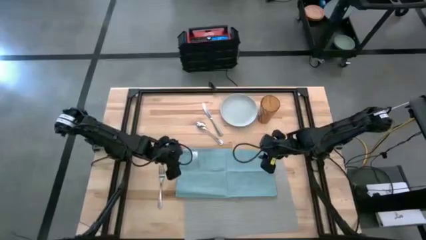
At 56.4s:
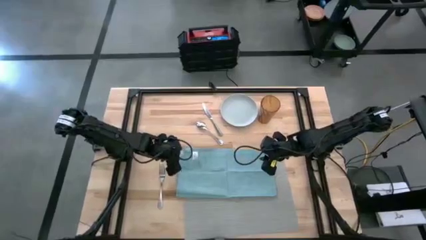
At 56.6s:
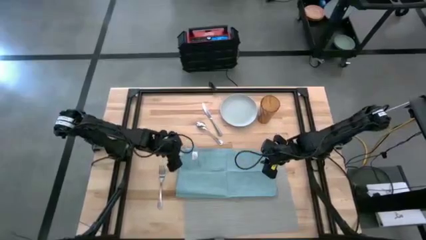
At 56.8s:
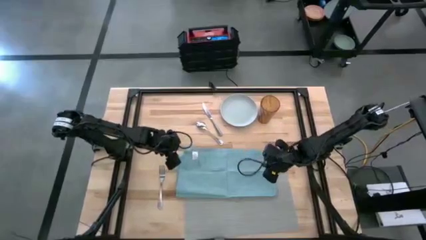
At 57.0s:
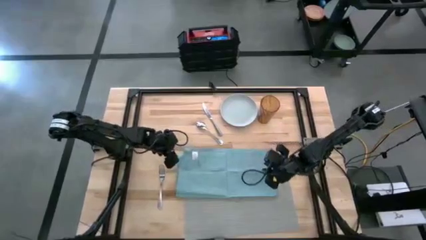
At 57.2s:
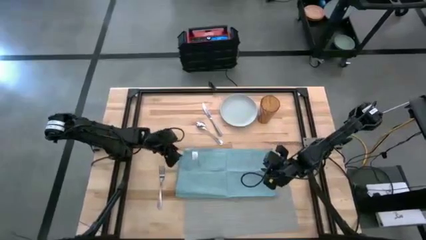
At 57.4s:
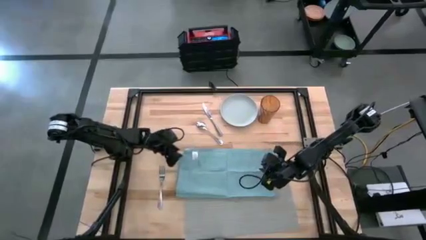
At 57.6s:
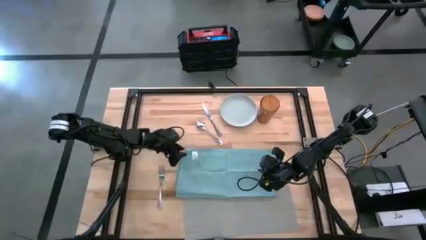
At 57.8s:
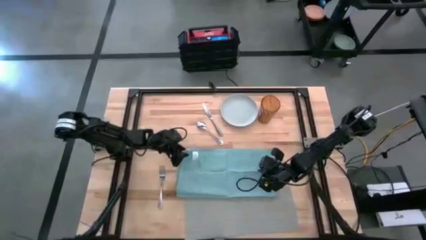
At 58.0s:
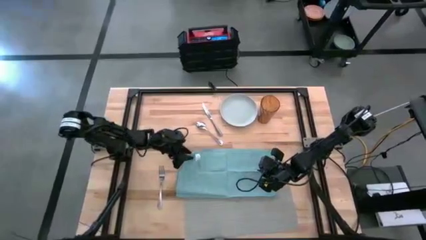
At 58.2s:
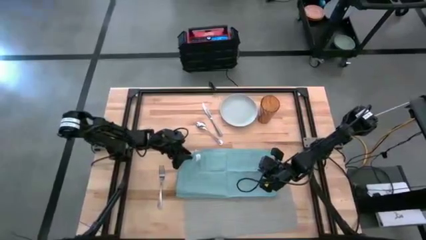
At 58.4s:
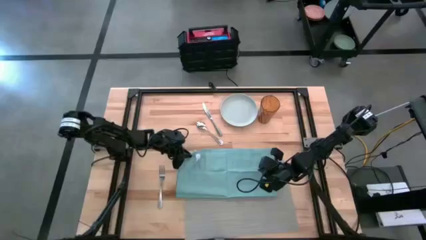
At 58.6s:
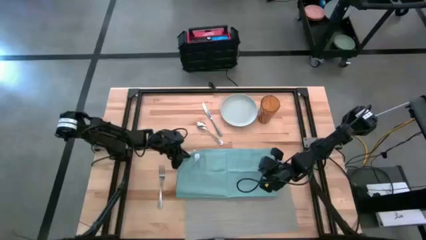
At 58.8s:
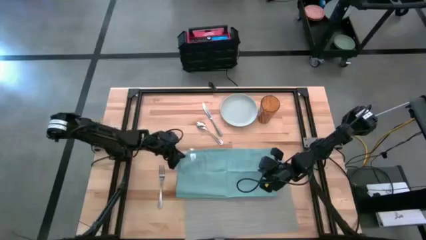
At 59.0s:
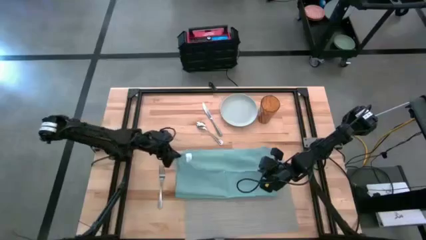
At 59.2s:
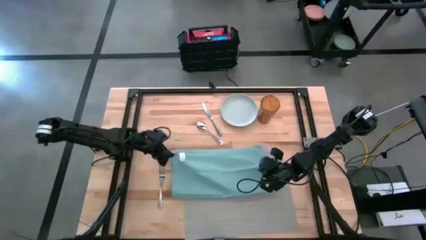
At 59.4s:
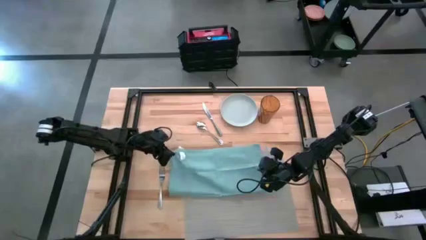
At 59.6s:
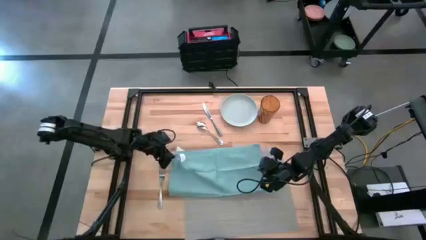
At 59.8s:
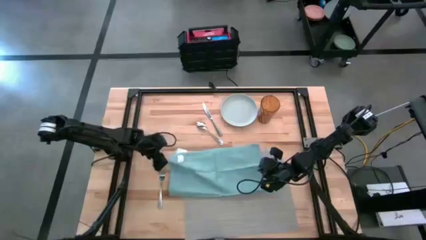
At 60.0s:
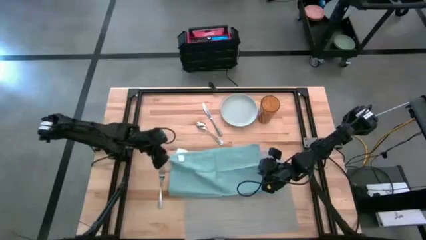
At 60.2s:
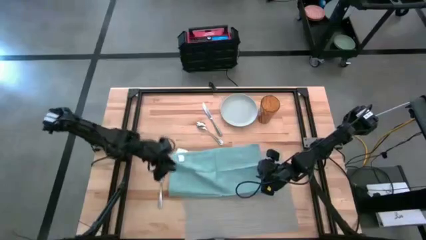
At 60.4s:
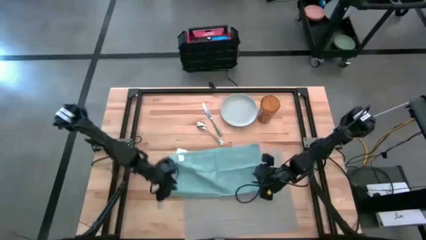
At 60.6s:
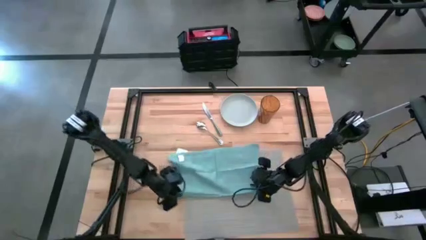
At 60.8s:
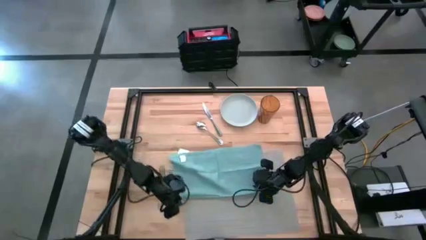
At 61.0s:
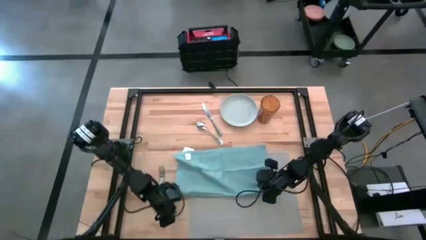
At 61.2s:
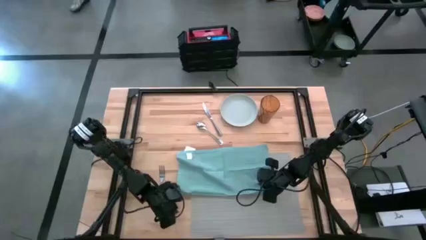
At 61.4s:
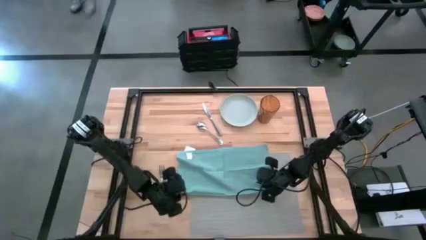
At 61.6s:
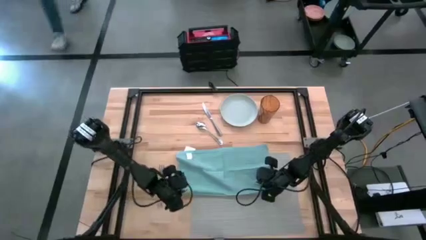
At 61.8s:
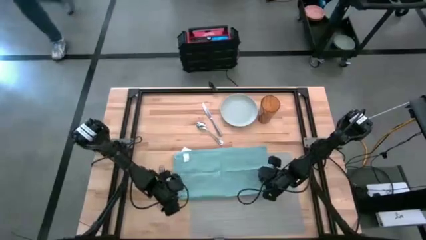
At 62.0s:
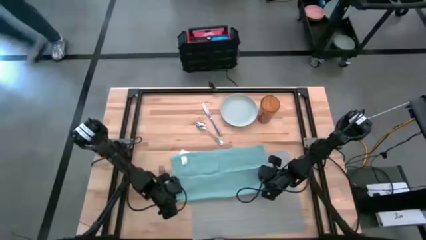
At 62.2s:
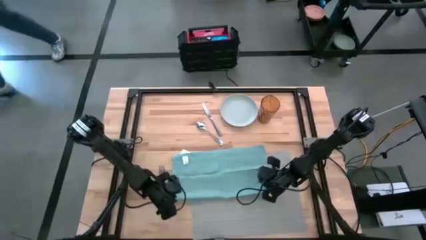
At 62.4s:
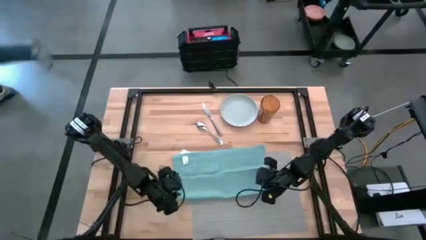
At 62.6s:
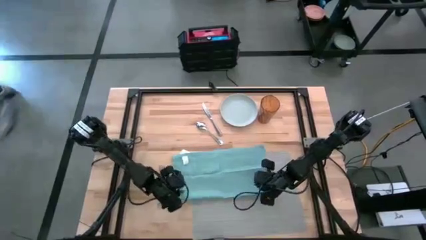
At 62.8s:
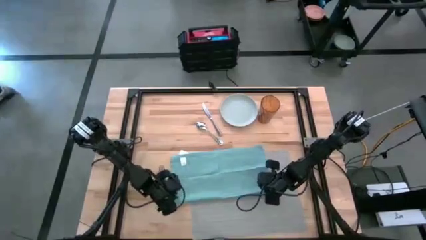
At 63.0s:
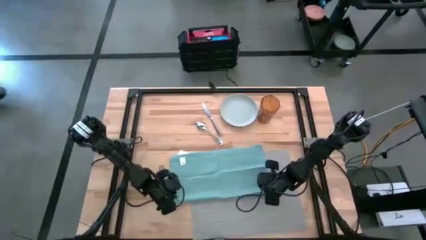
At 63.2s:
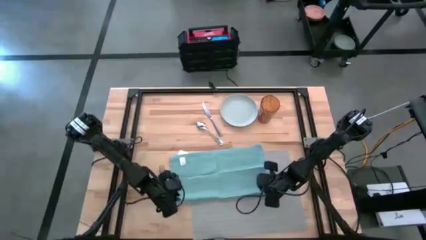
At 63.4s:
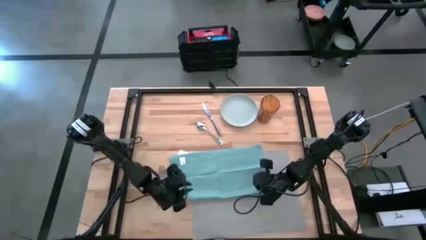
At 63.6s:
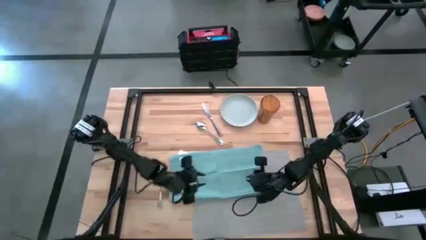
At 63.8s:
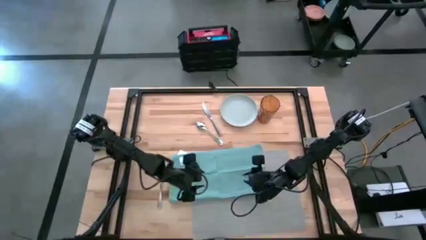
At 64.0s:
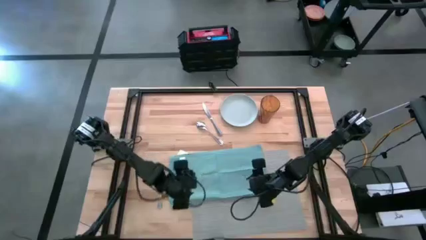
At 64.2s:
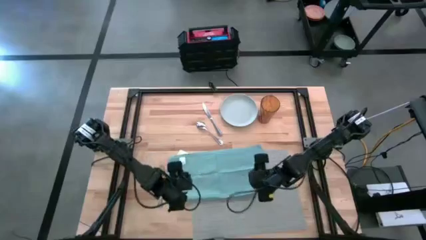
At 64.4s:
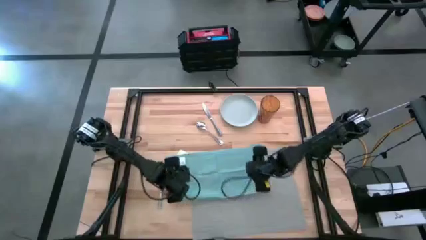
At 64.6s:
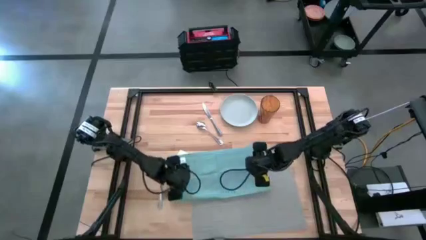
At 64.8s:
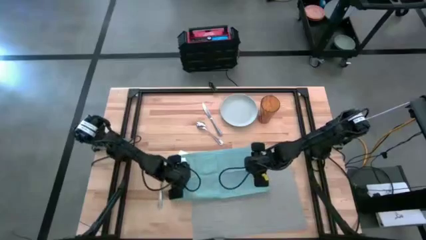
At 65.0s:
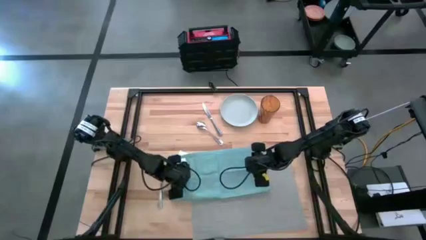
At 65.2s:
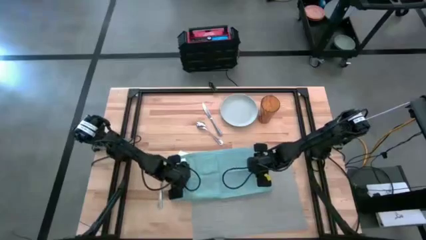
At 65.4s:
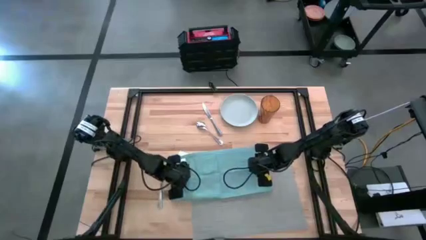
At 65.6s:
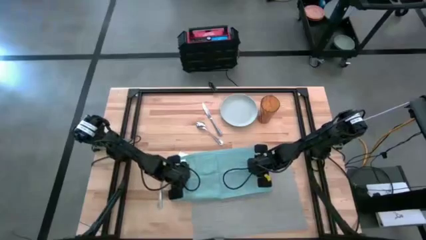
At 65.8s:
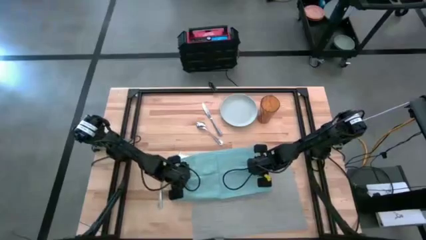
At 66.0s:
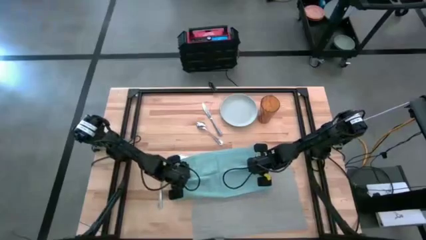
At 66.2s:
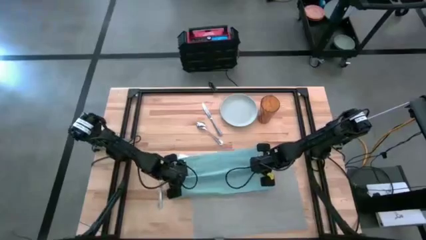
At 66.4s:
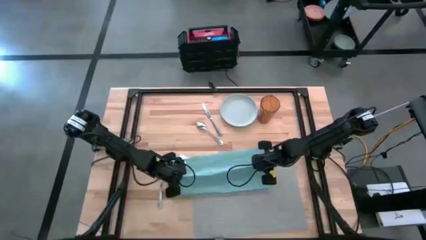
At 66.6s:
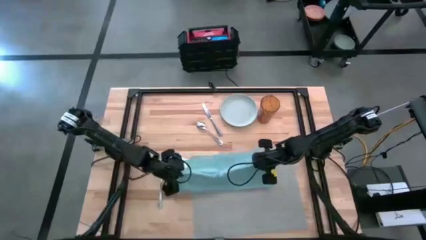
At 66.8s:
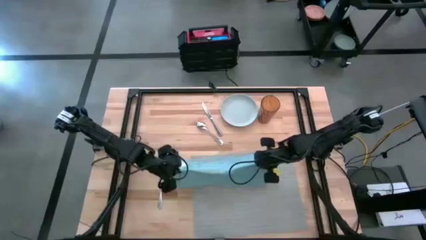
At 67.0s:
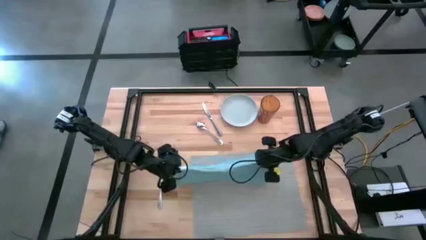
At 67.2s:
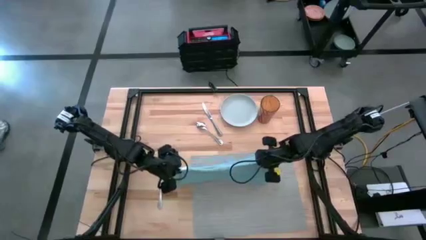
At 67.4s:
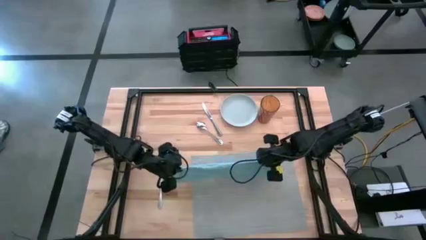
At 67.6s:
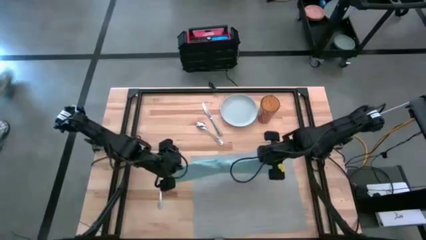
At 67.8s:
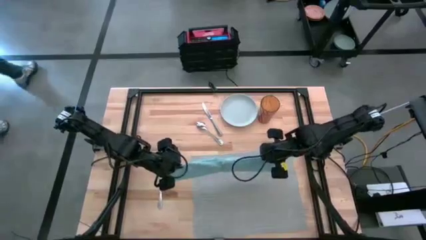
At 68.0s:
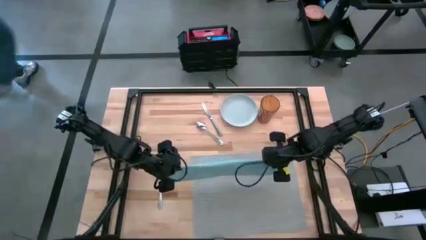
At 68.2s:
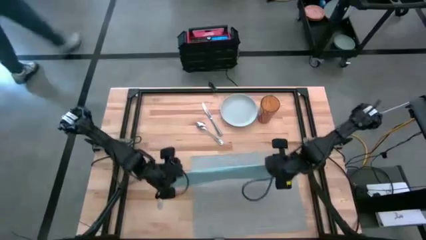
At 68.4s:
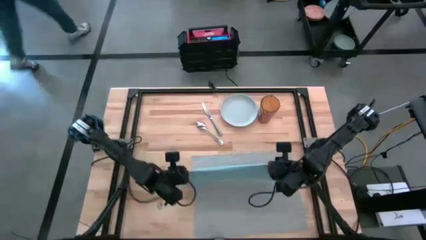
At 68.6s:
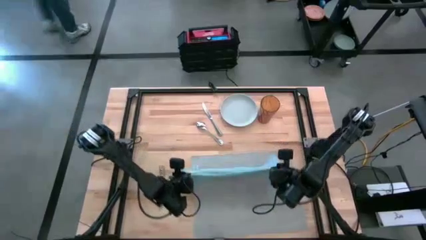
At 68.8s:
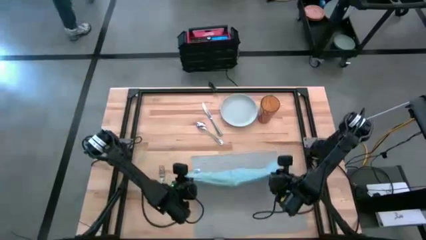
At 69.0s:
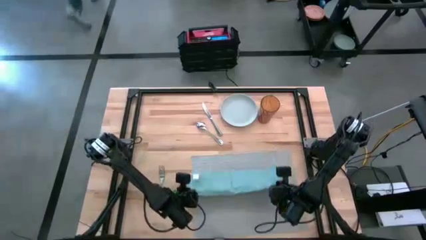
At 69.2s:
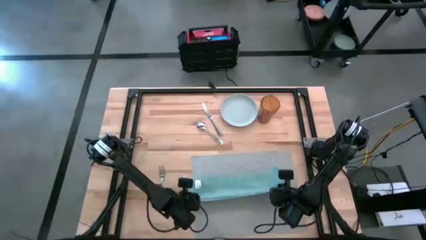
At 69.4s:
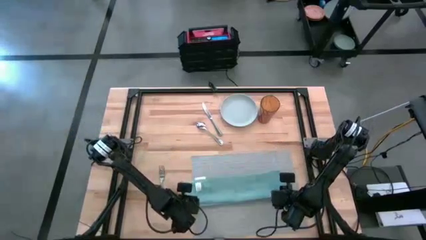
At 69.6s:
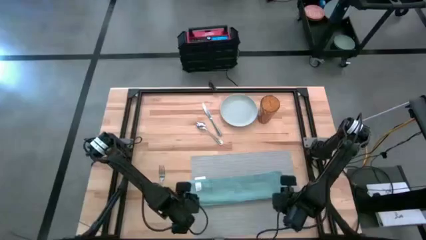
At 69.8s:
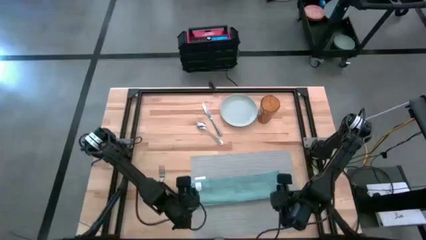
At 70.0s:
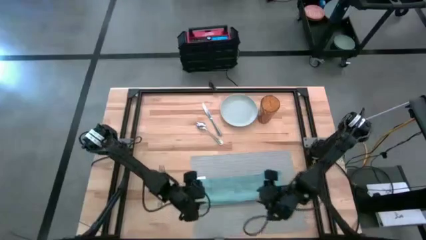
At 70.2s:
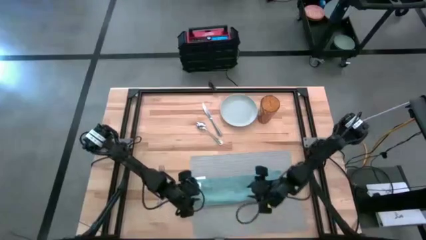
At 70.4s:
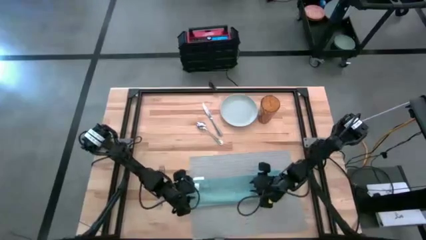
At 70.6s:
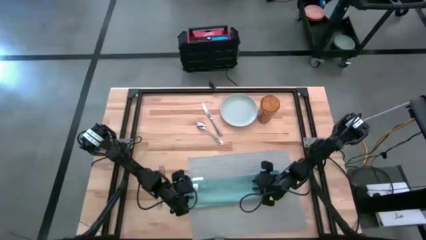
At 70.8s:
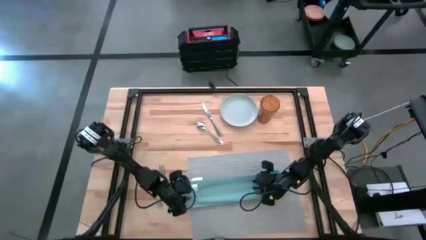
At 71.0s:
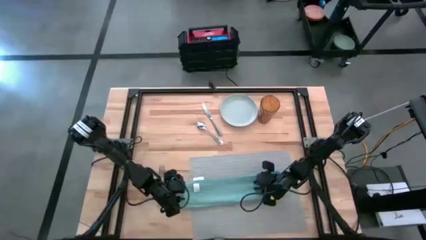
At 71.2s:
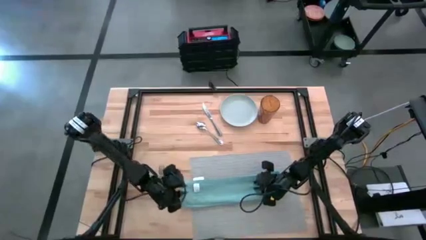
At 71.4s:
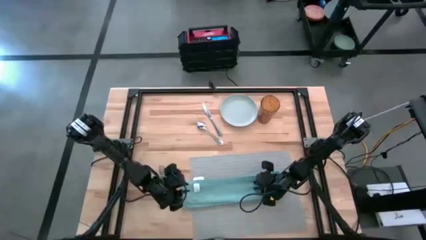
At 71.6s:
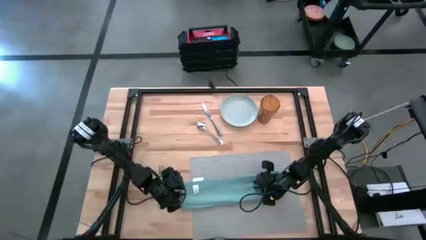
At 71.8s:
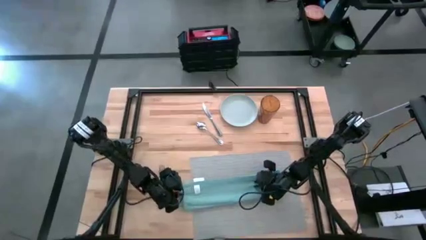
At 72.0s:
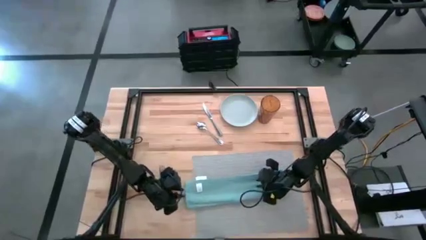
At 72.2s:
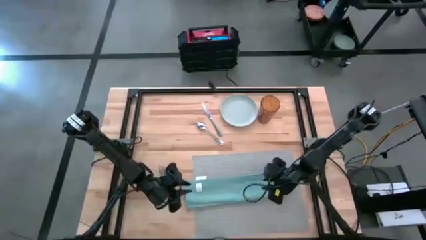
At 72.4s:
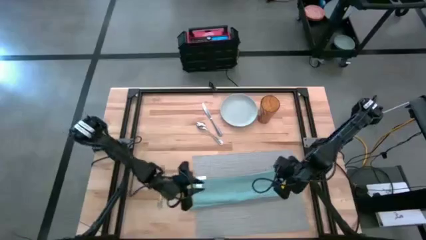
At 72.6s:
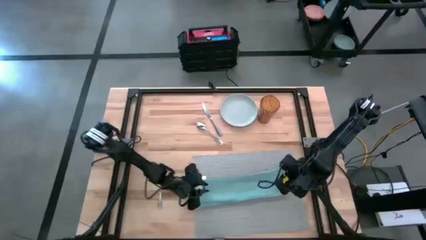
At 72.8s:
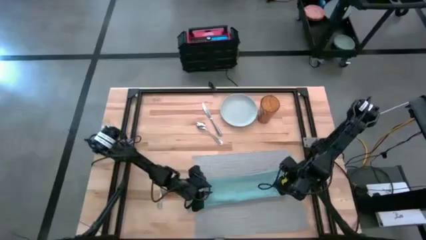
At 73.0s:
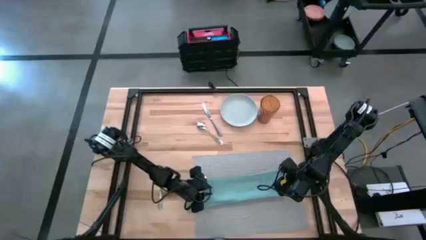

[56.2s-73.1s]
Task: Set table place
Fold the blue napkin on the gray placemat
